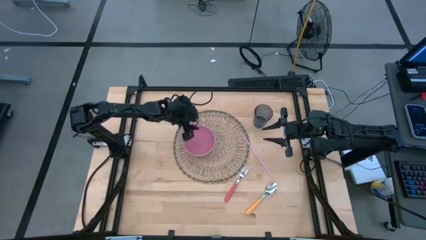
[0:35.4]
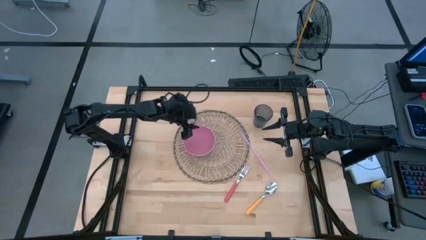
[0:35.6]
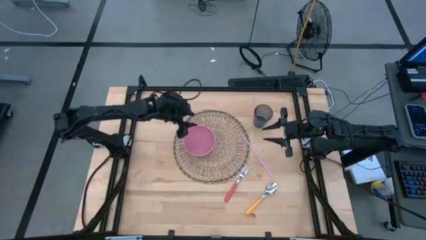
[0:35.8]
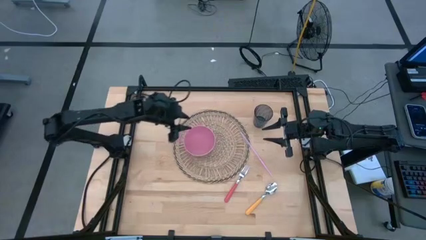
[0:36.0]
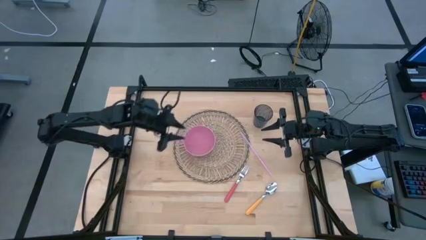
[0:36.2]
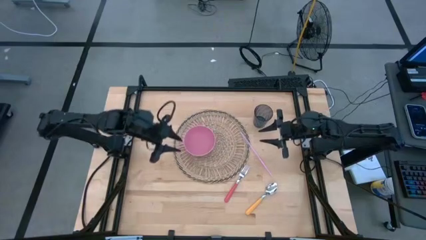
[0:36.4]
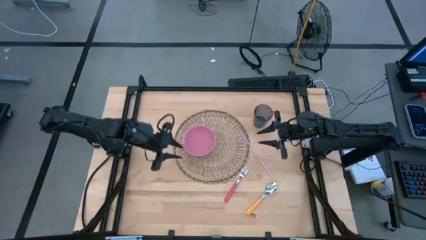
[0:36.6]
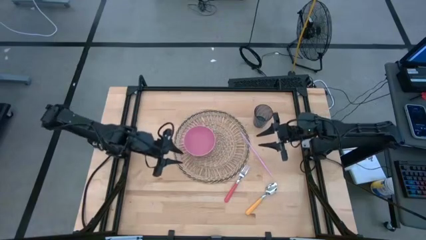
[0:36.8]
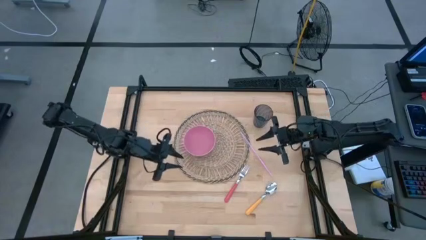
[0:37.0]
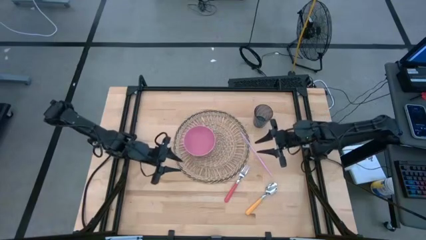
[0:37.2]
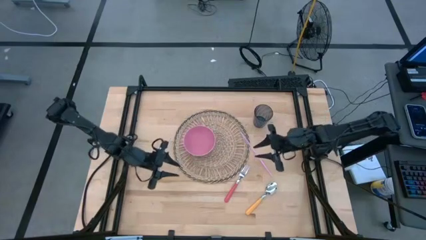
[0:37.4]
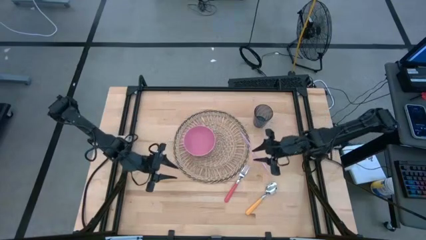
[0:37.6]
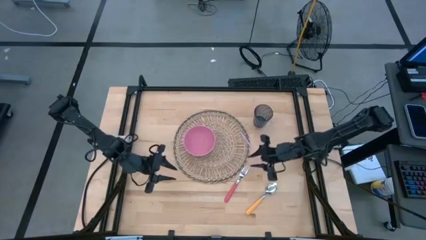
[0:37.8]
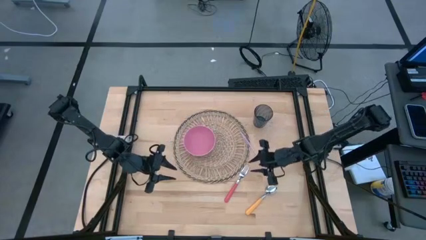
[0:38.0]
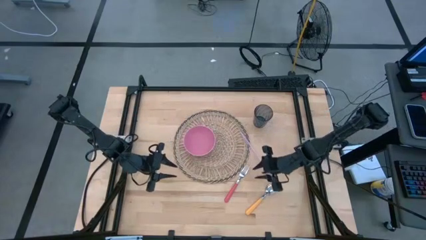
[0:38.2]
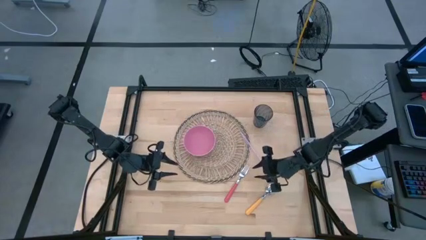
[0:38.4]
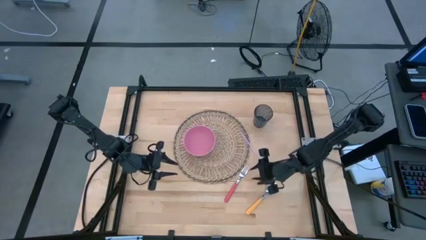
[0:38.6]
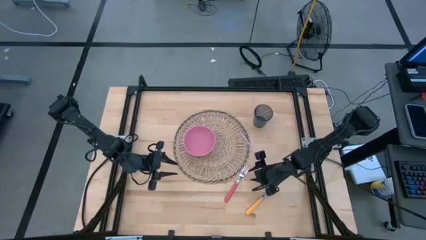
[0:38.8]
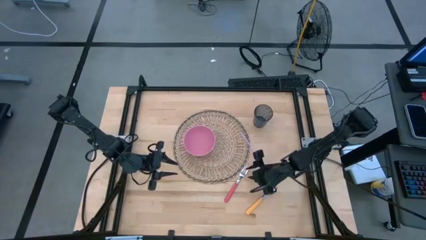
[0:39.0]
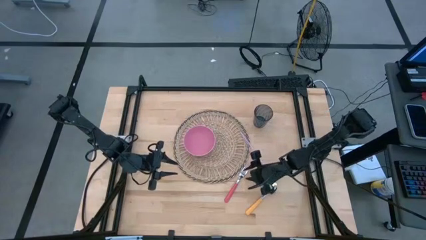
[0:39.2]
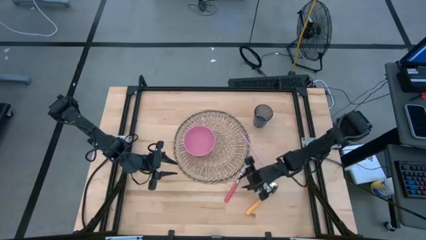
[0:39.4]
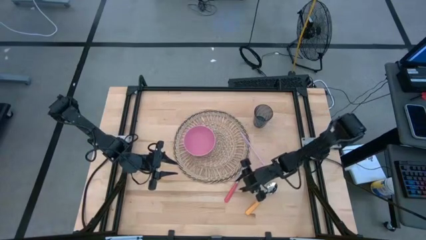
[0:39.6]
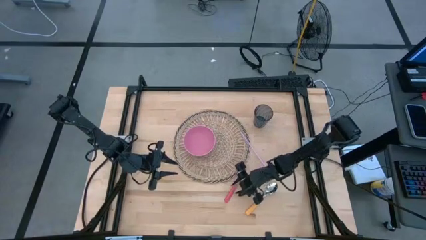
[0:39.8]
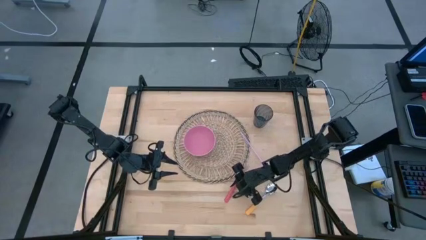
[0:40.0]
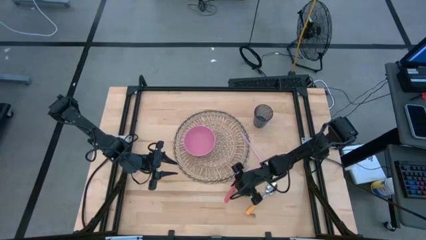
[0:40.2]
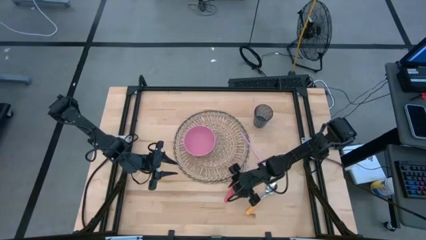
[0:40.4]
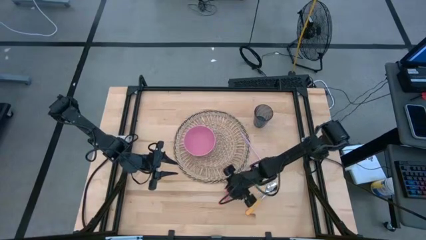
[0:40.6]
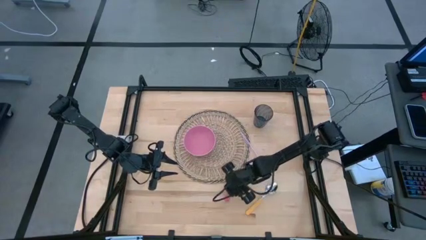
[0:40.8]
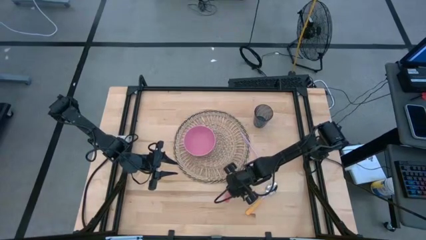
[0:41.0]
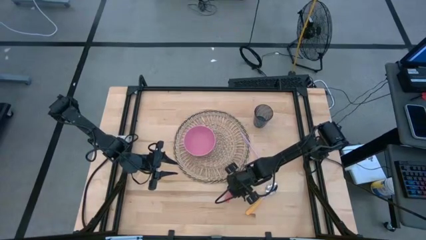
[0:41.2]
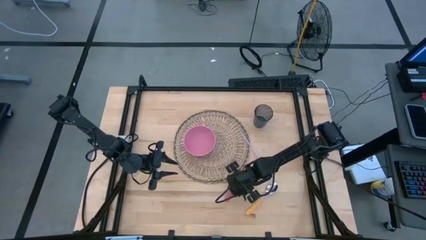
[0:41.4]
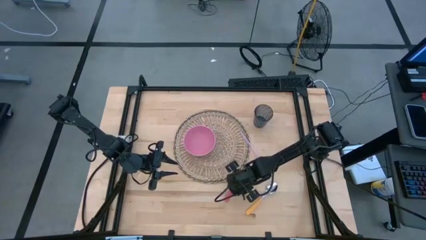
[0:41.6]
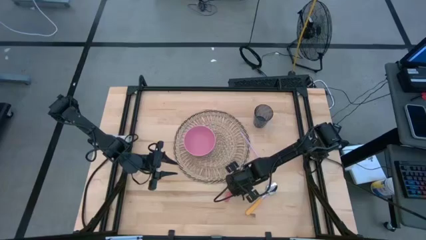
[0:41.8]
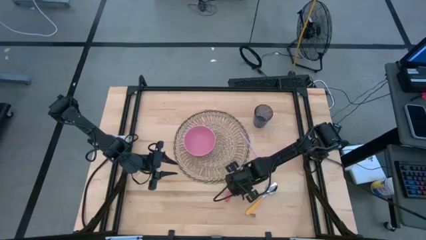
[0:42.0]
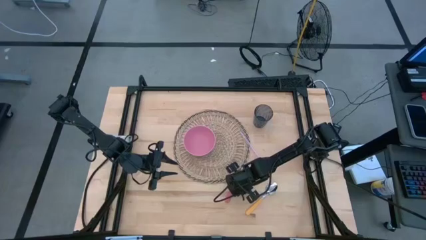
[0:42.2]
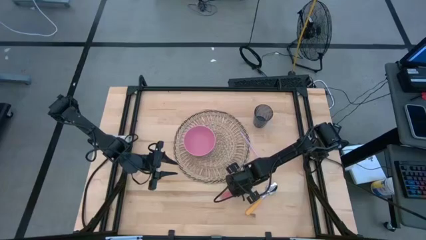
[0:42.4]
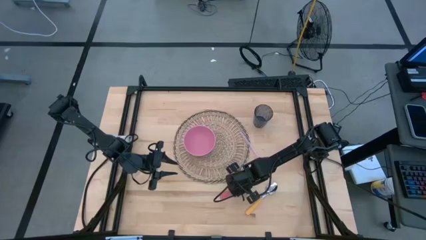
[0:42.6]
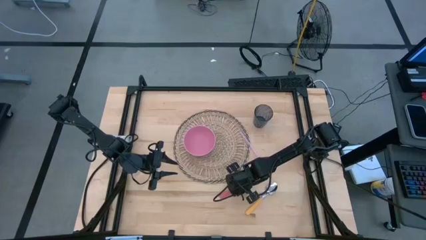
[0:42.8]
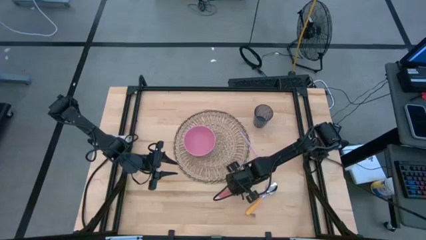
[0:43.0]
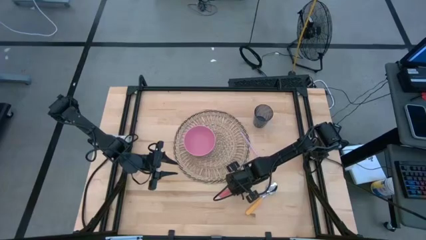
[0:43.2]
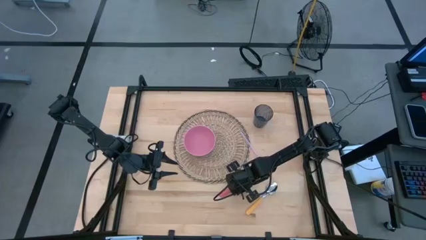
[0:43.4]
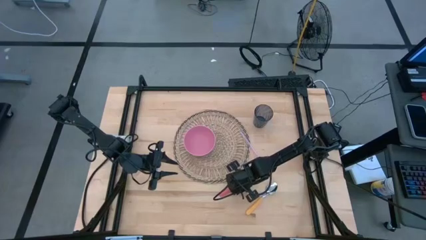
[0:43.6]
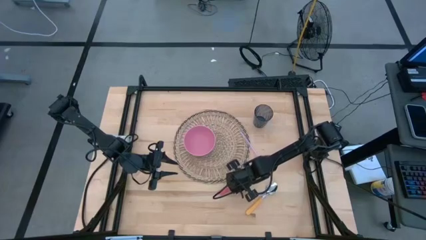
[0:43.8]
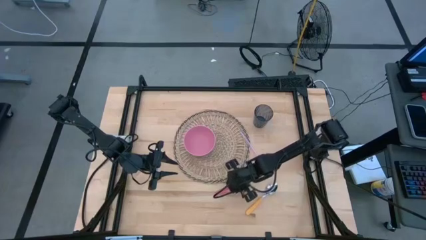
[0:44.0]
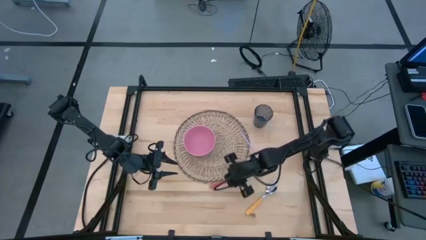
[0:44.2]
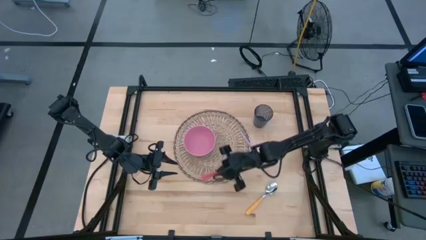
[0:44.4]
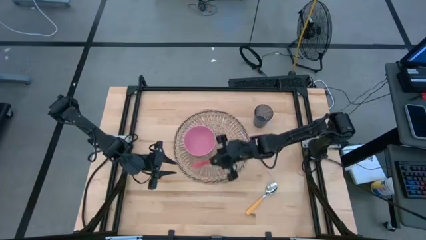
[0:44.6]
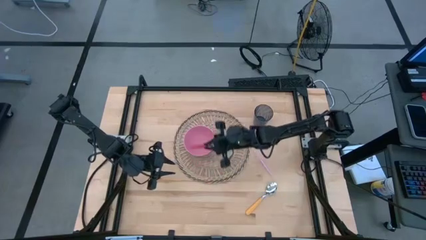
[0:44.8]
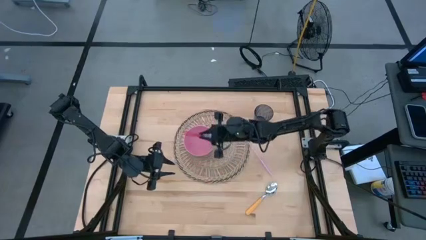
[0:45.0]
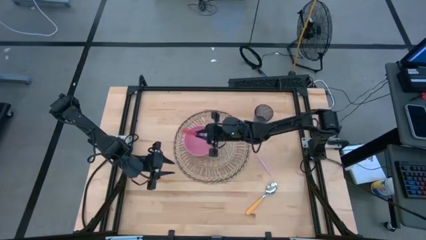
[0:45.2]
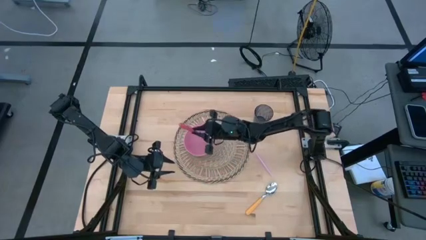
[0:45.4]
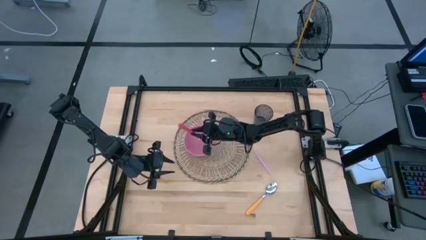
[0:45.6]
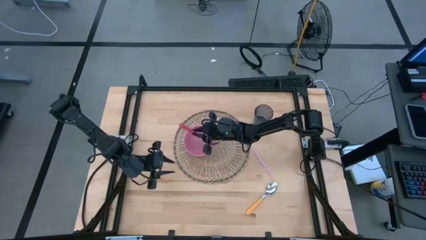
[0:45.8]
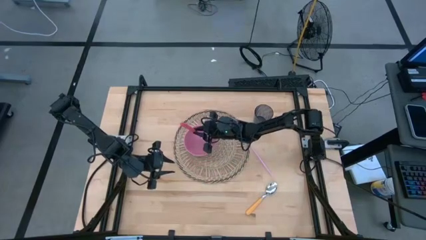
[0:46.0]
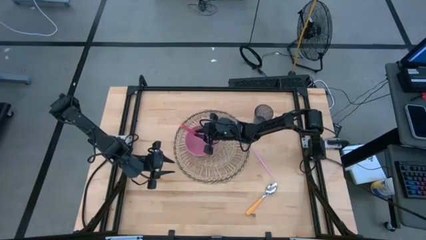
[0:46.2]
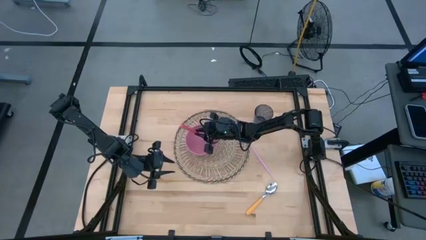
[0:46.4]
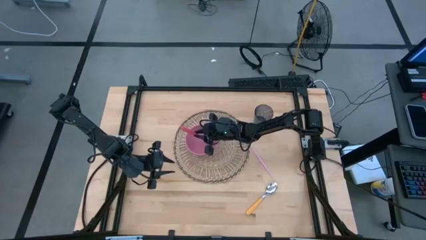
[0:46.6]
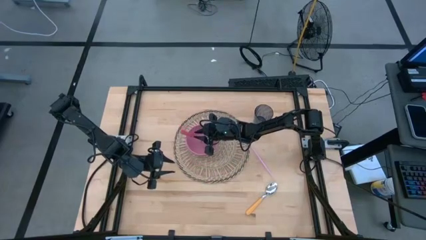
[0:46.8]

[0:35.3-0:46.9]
Task: Pick & Place Utensil
Put the pink fork into the pink bowl

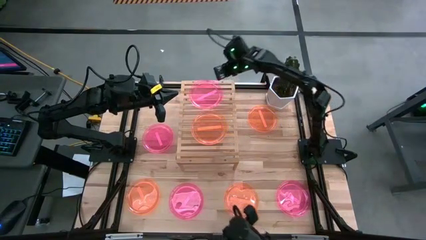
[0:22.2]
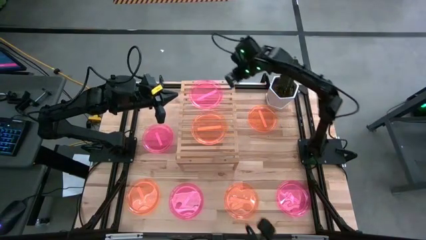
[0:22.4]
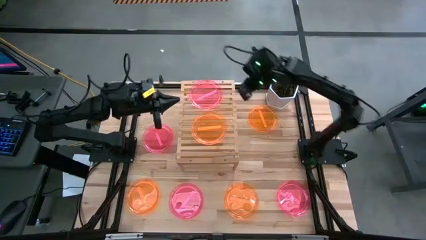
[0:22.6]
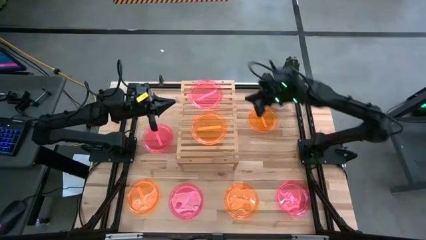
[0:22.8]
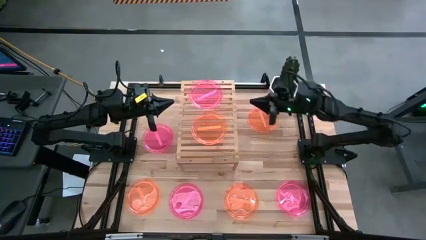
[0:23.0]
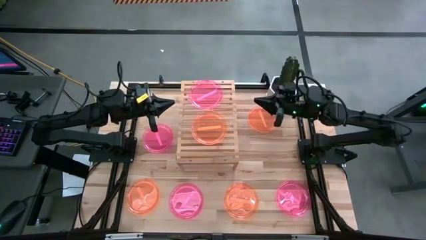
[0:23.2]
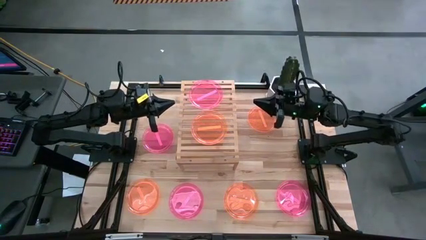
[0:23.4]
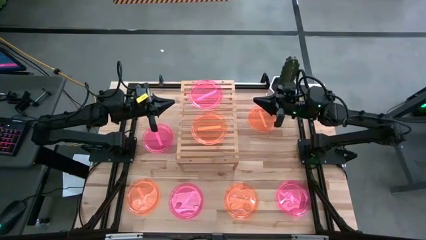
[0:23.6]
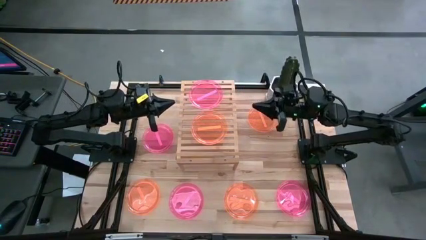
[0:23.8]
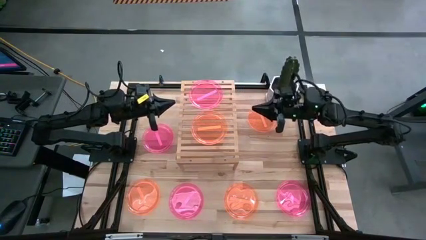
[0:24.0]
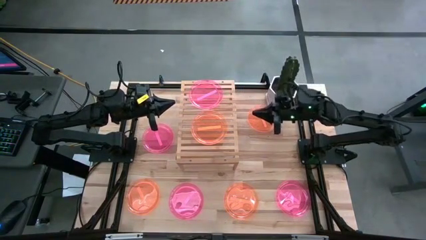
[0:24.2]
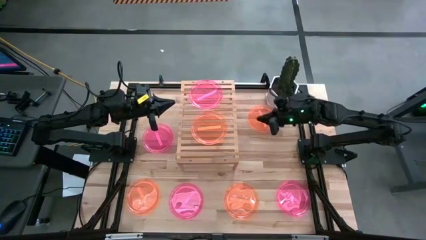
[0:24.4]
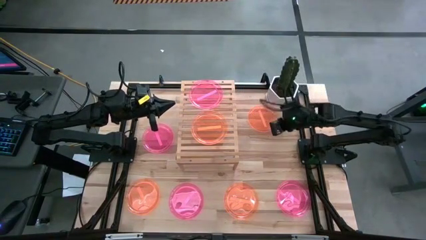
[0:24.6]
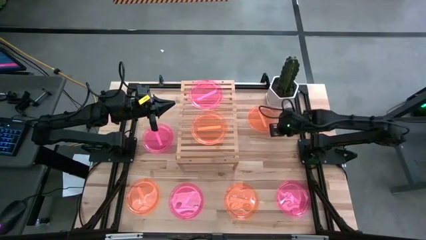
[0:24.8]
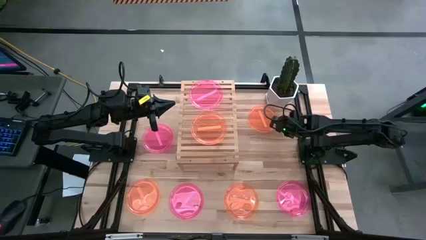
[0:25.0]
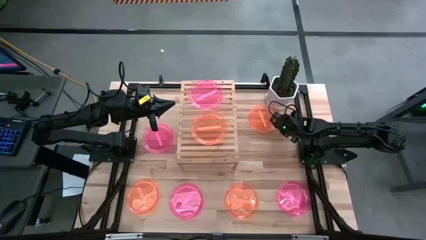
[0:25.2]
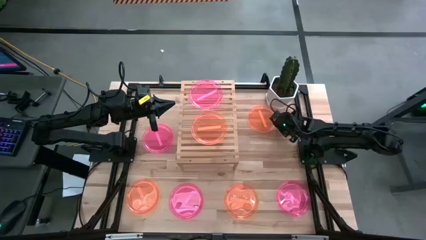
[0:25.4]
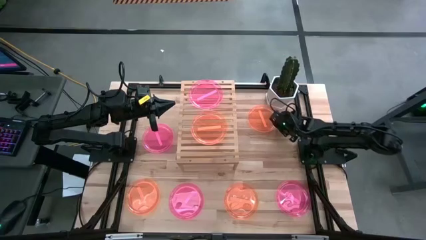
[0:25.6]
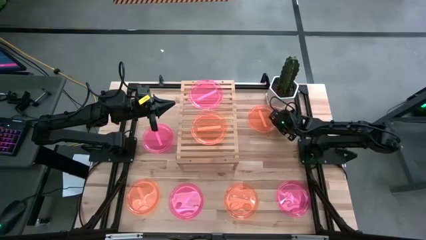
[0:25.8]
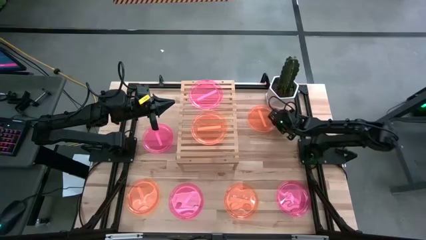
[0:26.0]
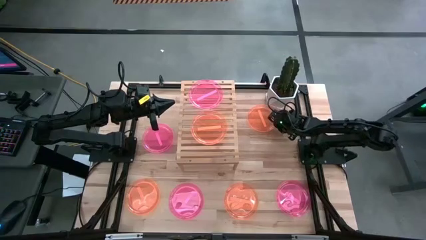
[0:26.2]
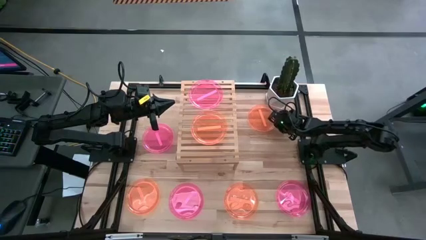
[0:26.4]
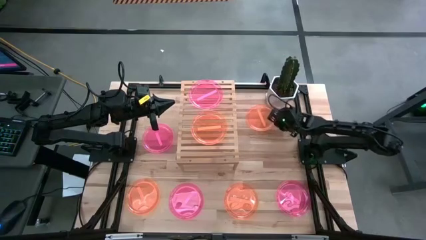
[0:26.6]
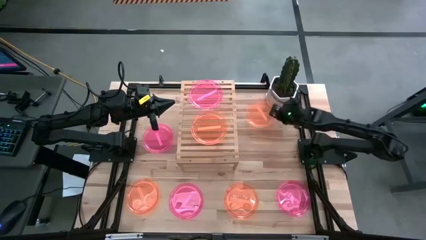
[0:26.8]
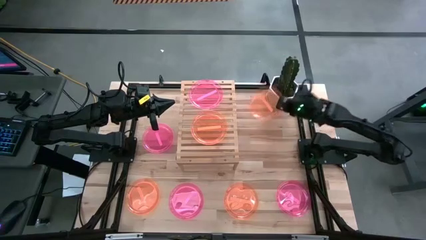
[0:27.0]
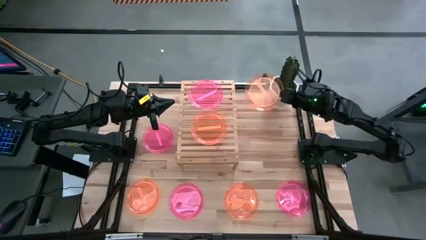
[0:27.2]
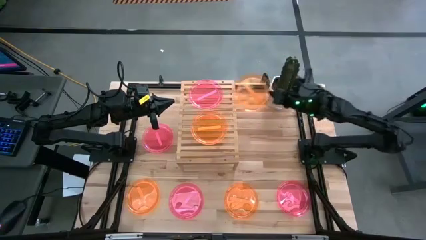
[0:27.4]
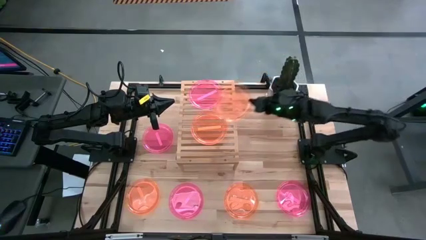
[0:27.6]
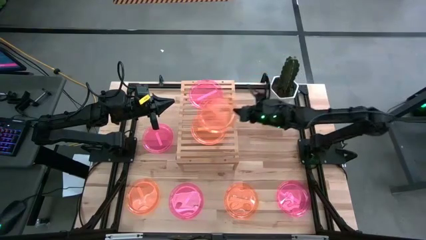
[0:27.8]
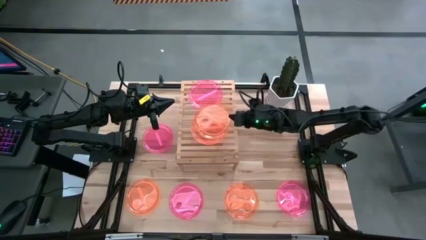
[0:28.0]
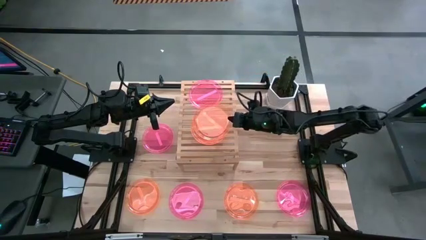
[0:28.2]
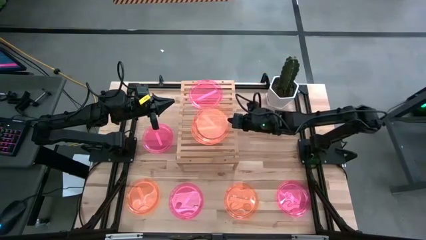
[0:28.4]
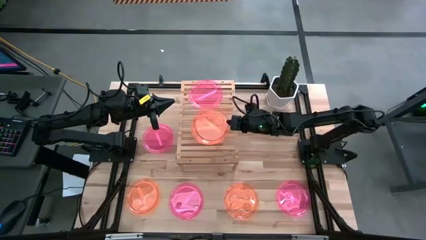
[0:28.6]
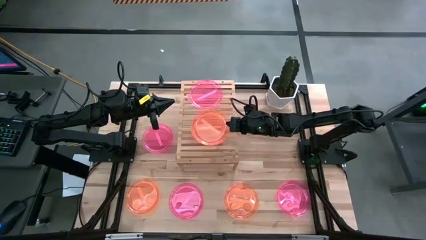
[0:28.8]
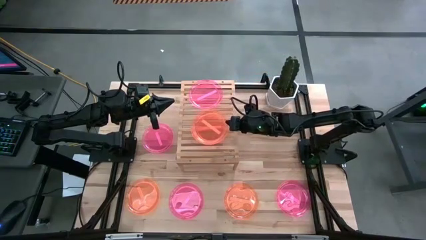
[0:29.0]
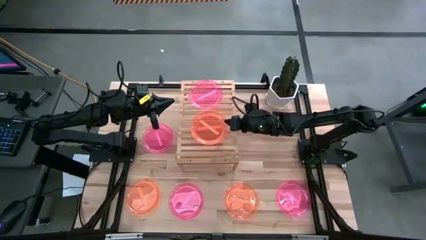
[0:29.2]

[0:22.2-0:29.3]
Task: Place and stack plates onto a shelf
Stack the orange plate on top of the other orange plate on the shelf
